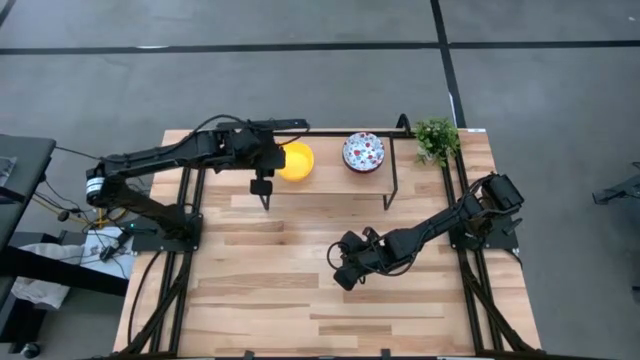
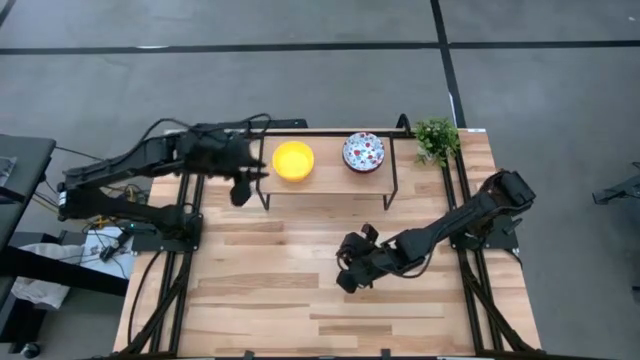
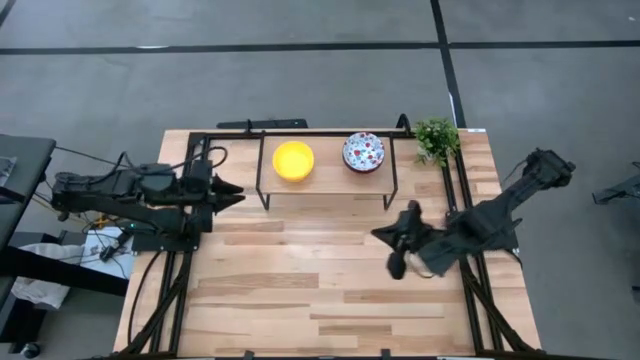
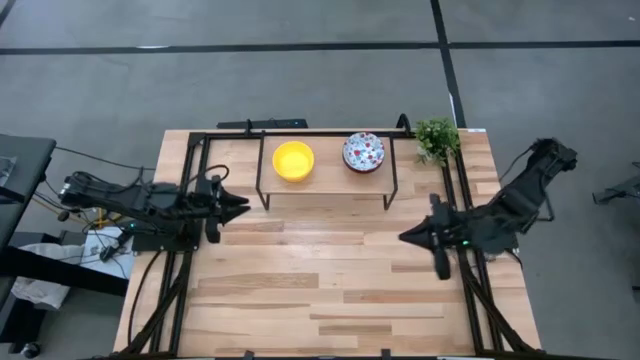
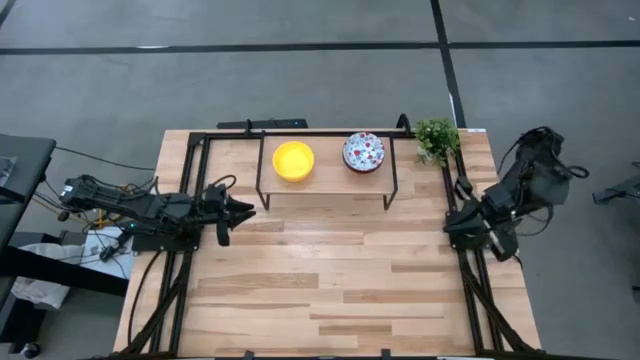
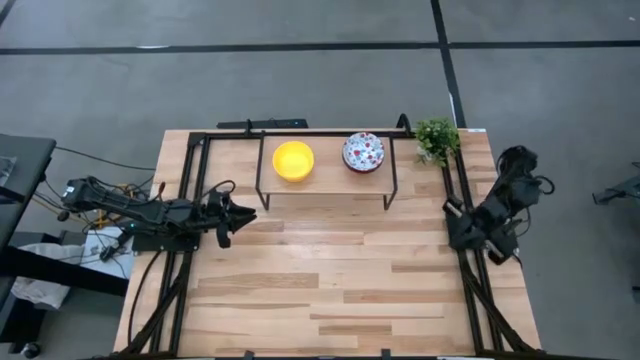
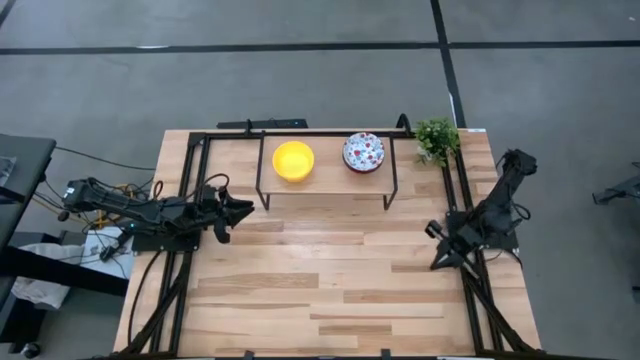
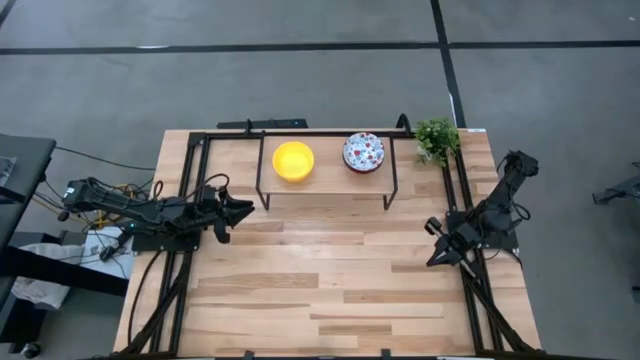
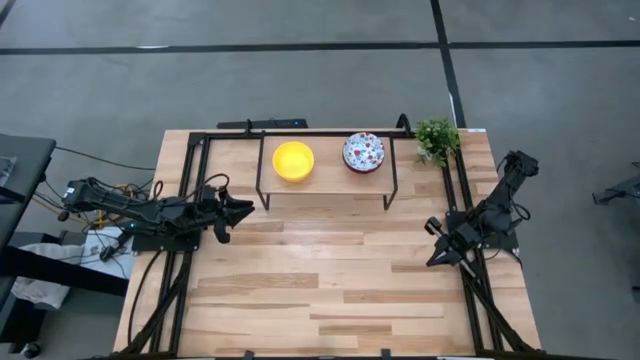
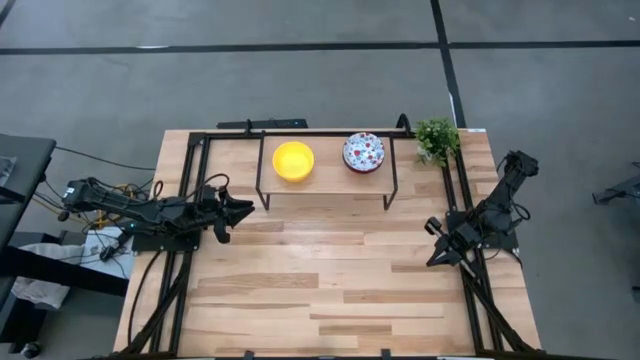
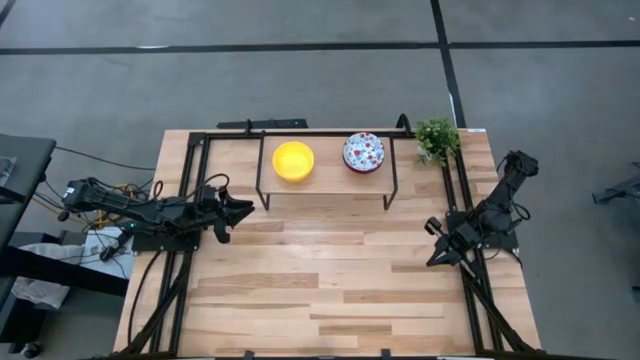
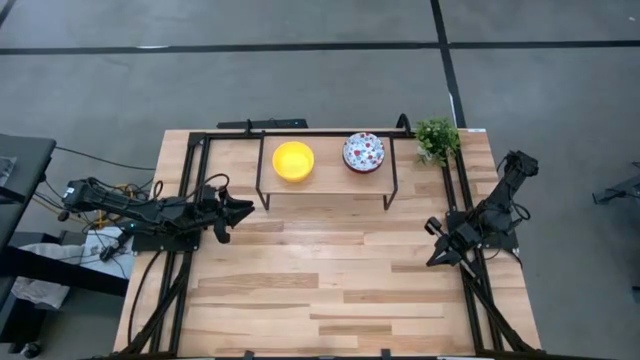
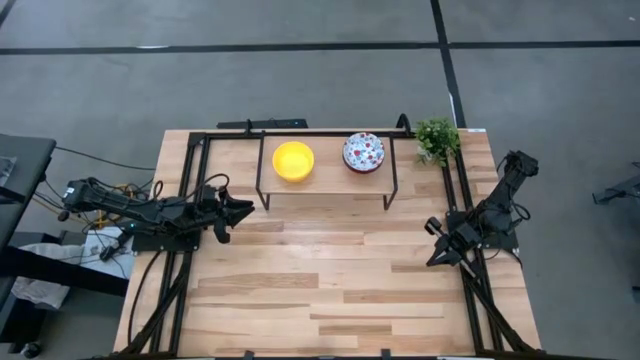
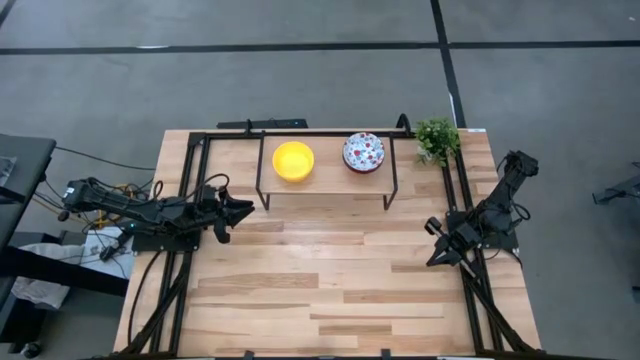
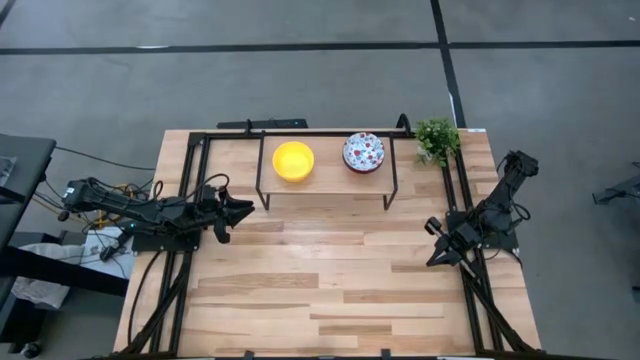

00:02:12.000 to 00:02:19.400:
Task: Pick & Place Mini bowls
Return to Home Position

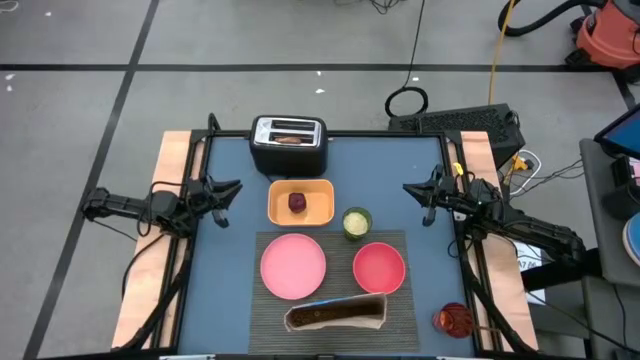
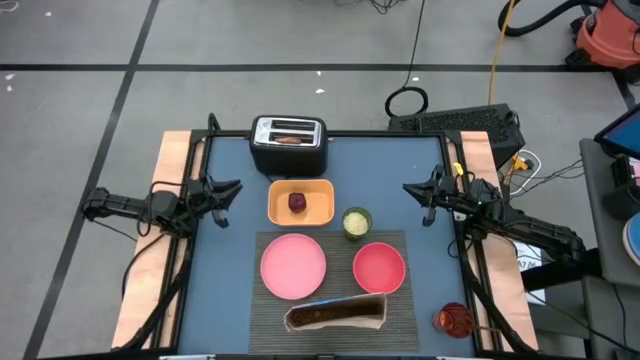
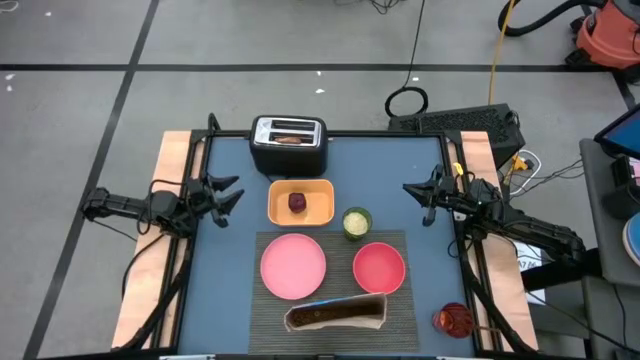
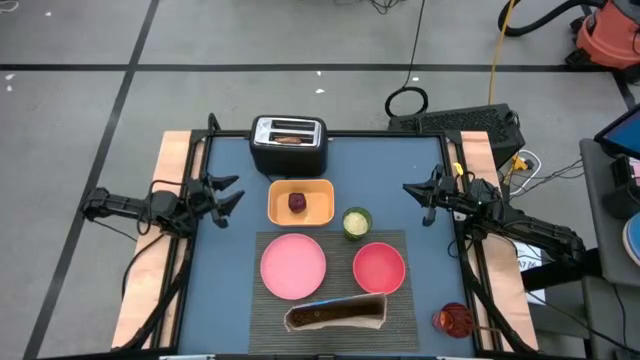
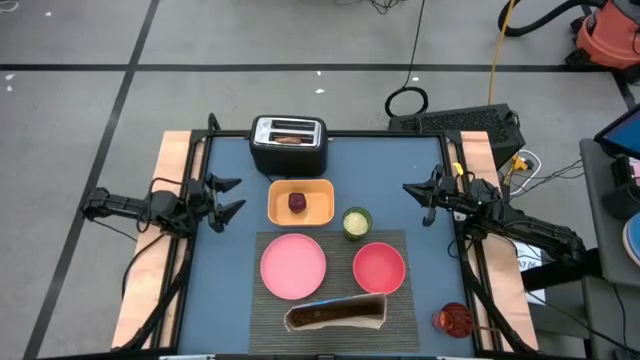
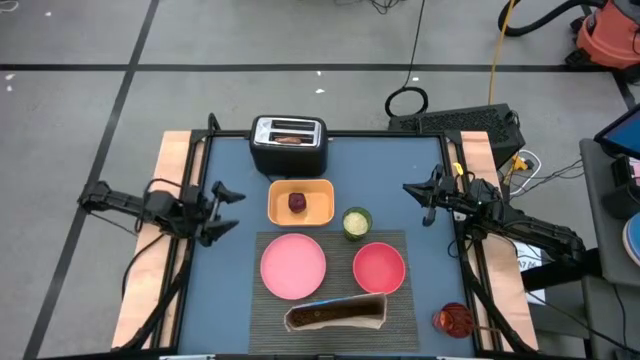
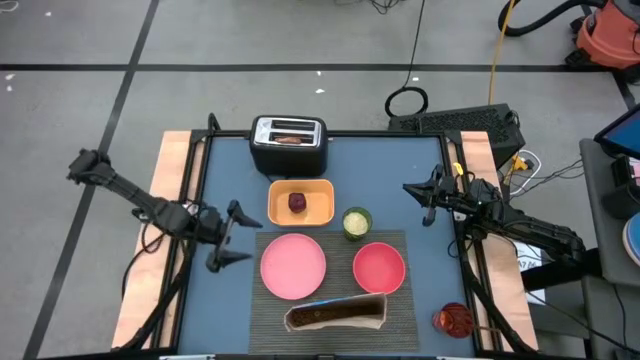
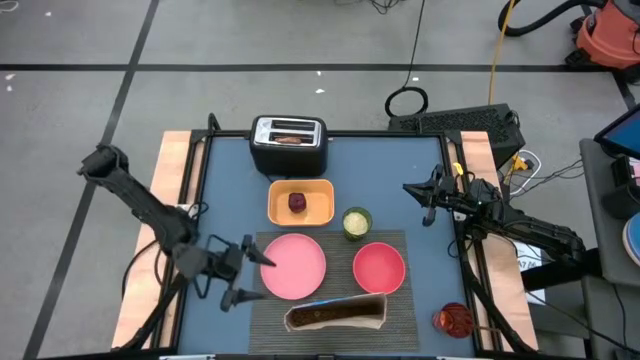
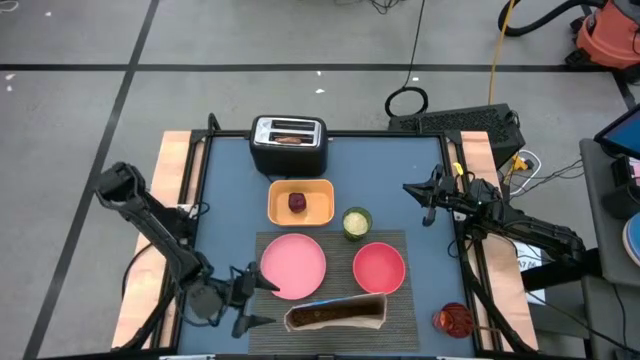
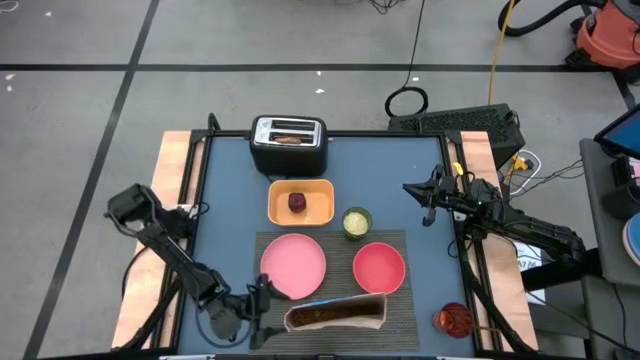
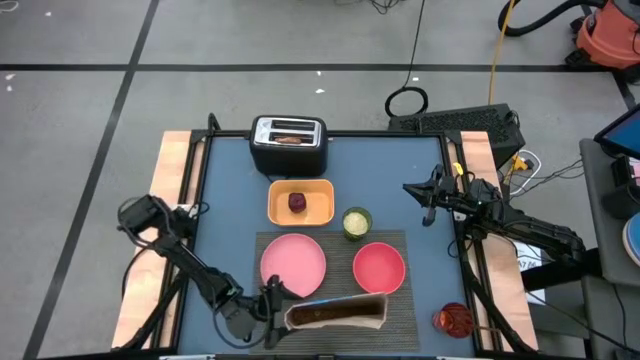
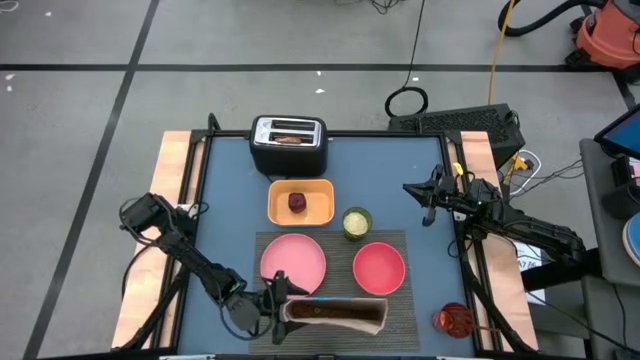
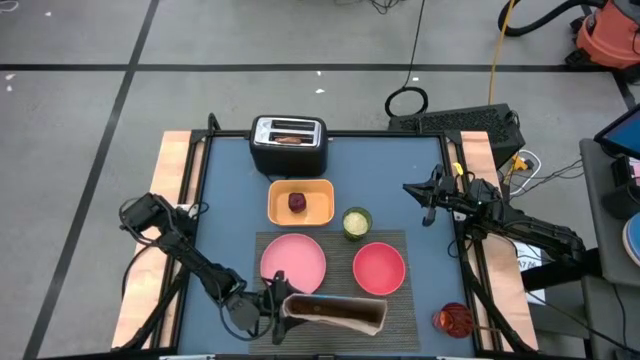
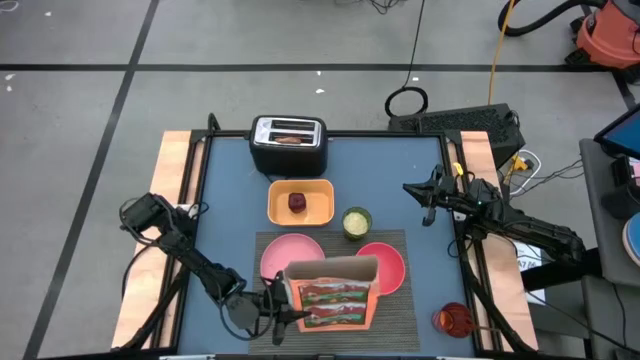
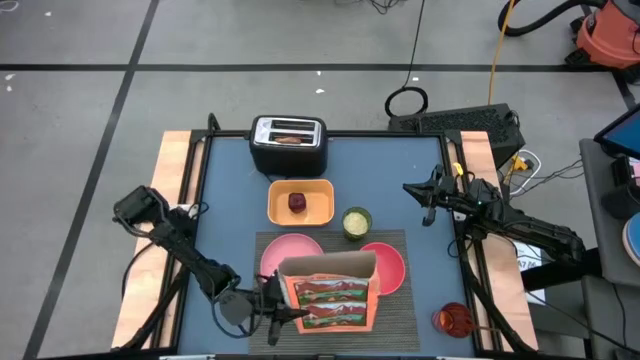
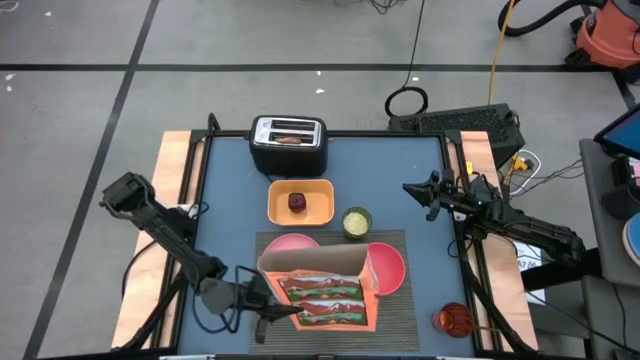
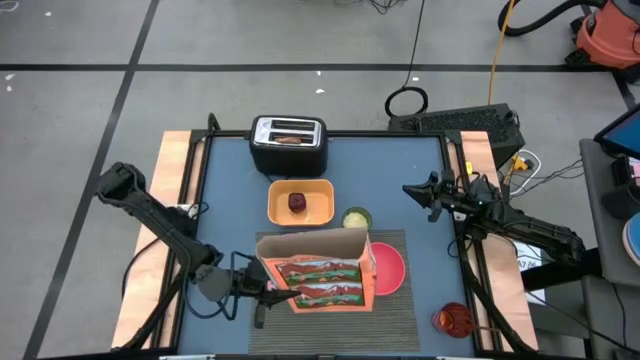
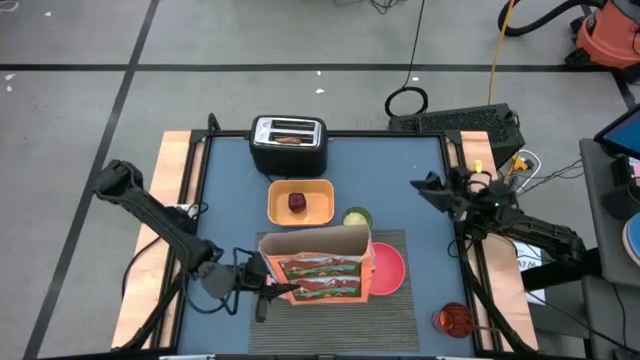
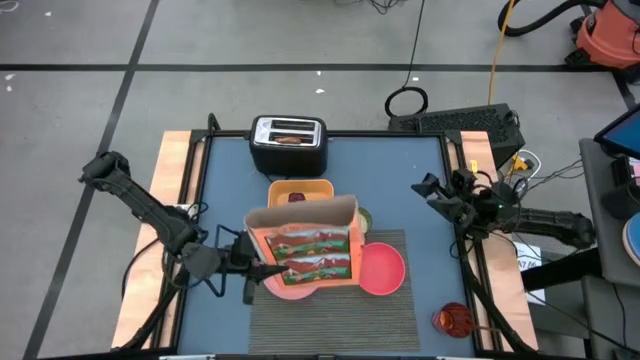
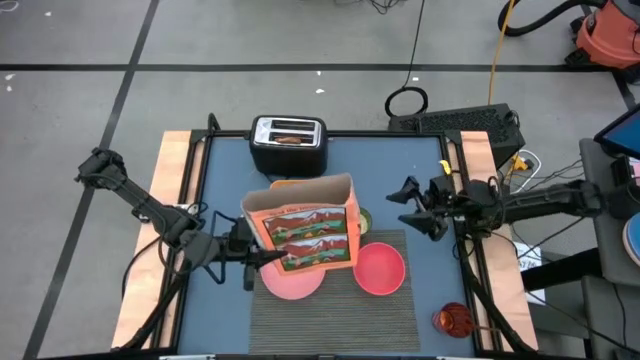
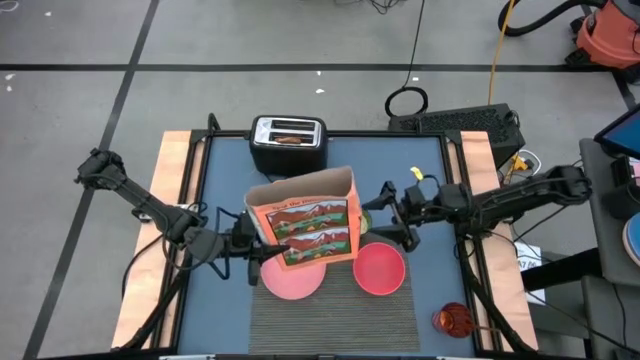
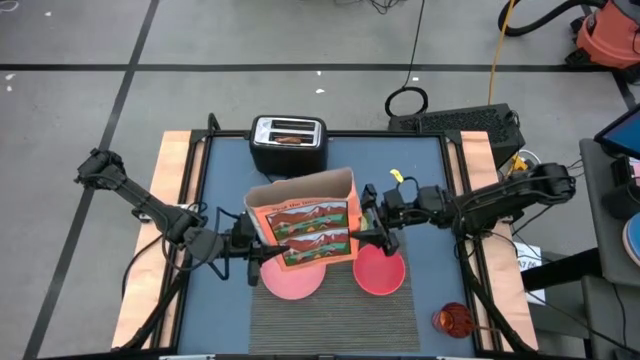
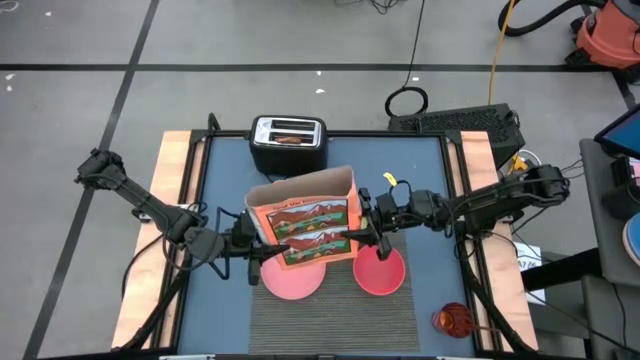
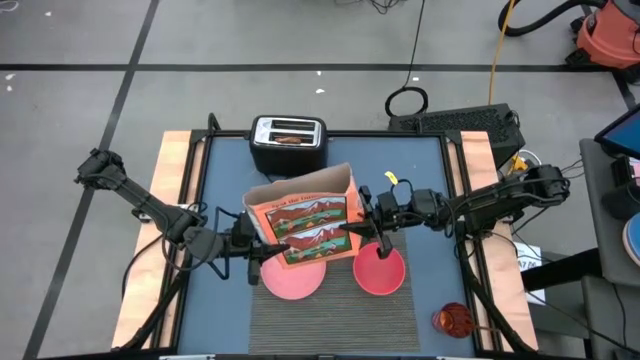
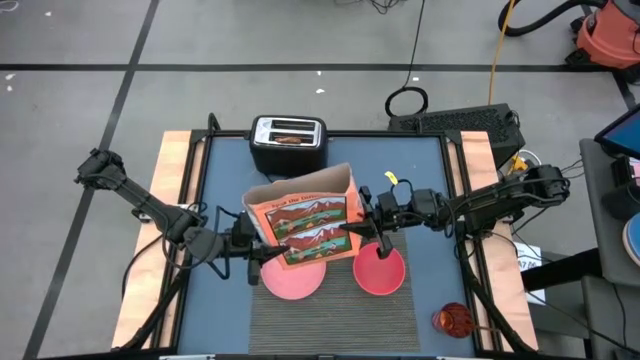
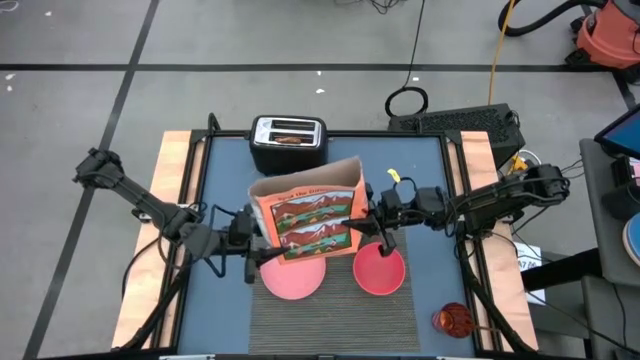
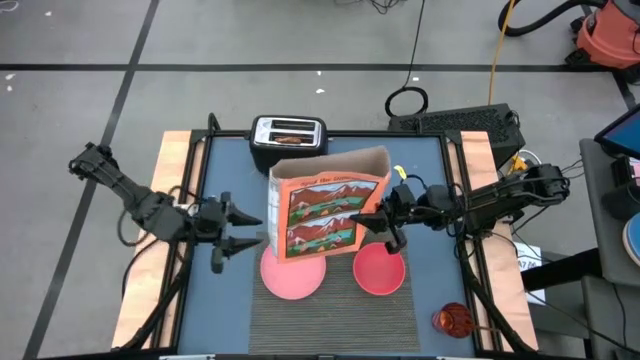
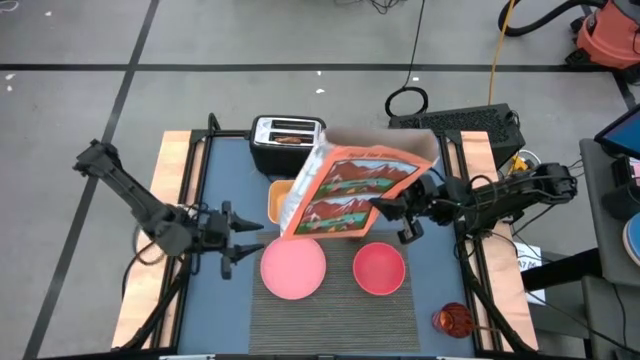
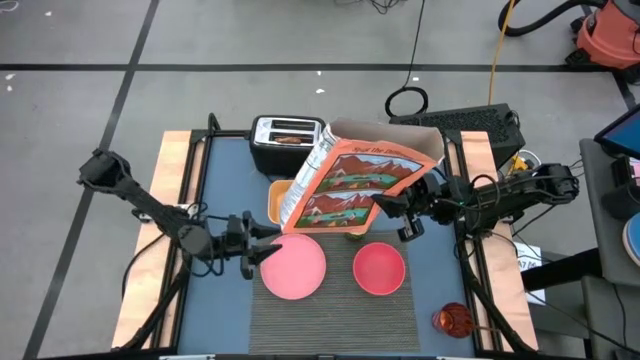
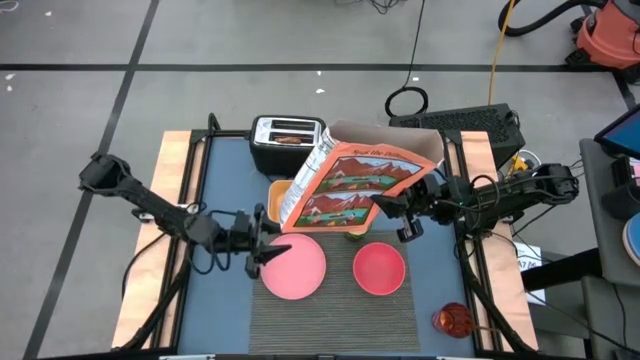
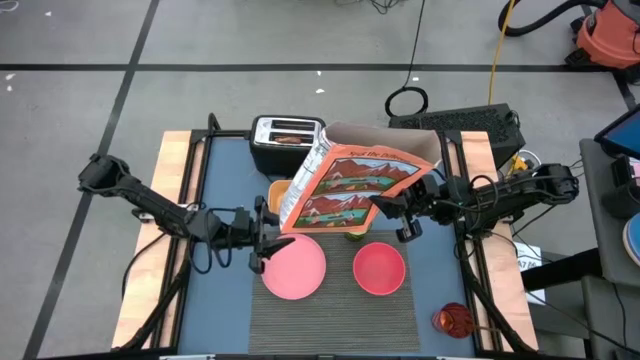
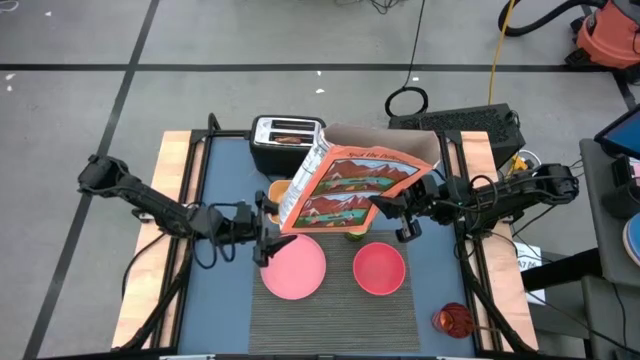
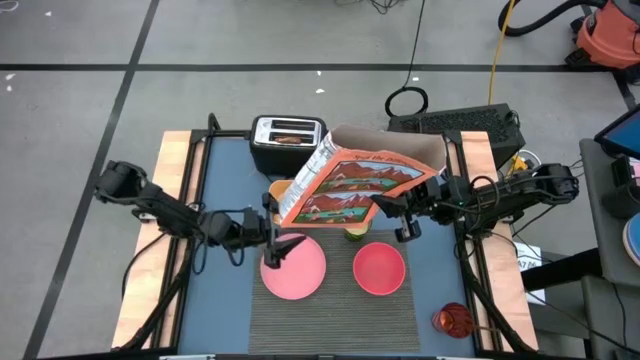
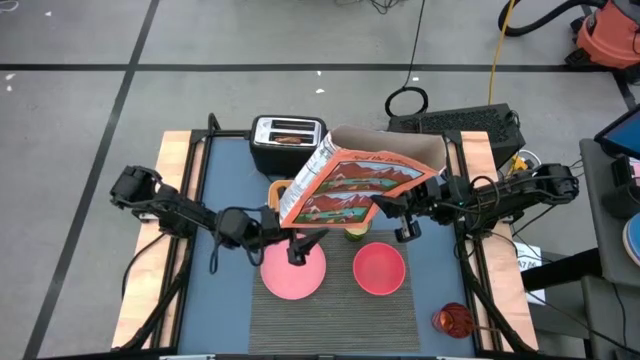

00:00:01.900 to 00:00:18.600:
Task: Arrange a breakfast setting
Pour the cereal from the orange cereal box into the pink bowl
